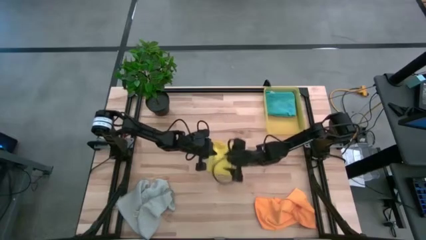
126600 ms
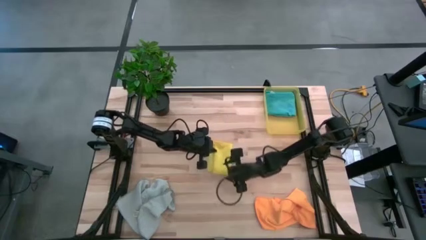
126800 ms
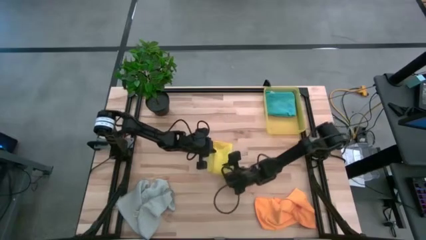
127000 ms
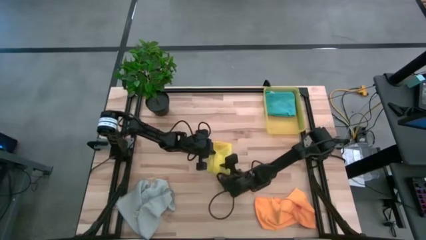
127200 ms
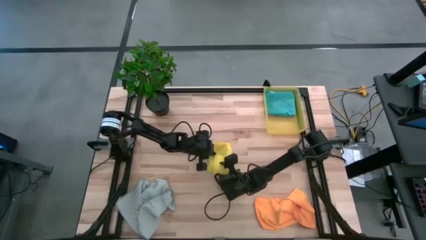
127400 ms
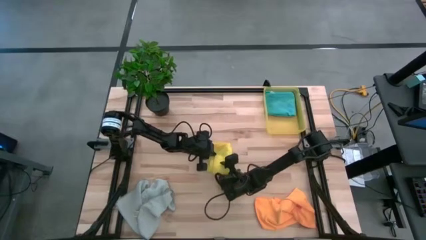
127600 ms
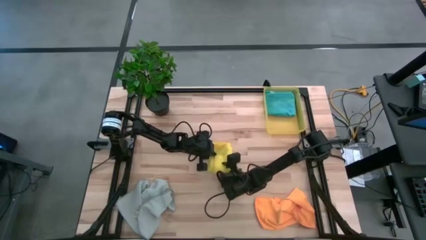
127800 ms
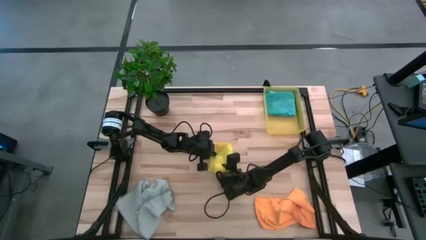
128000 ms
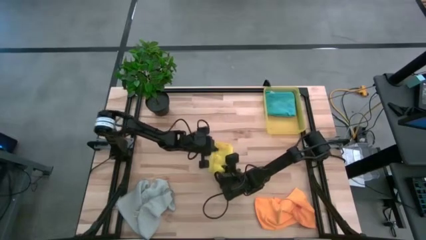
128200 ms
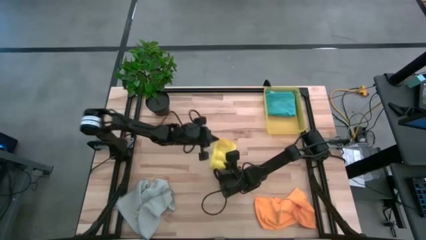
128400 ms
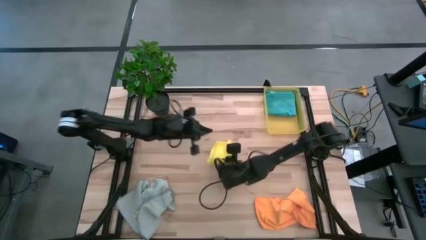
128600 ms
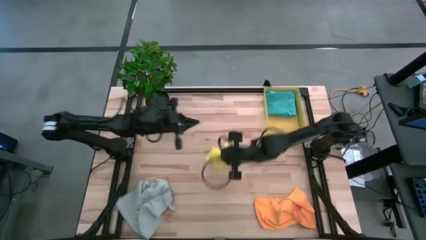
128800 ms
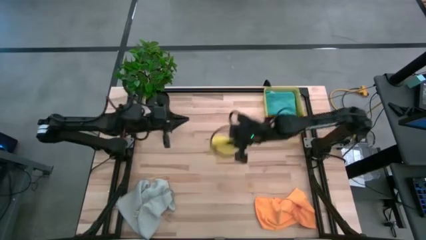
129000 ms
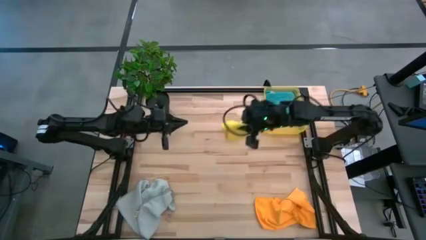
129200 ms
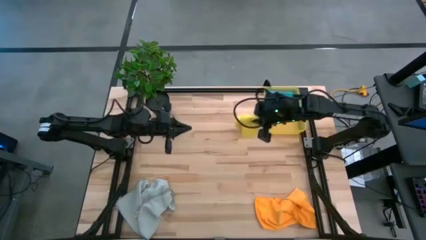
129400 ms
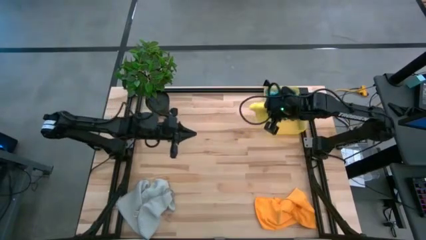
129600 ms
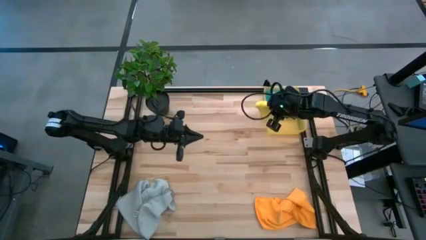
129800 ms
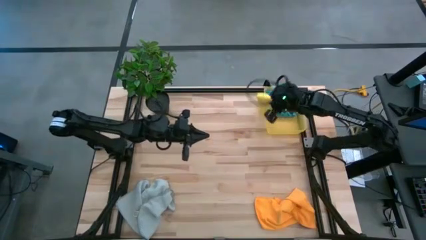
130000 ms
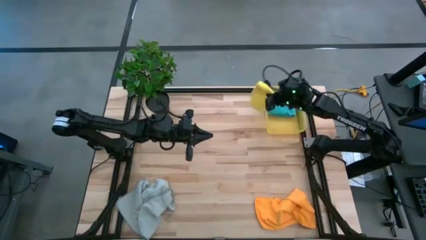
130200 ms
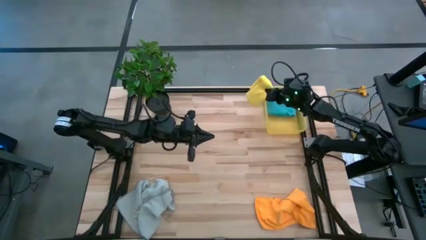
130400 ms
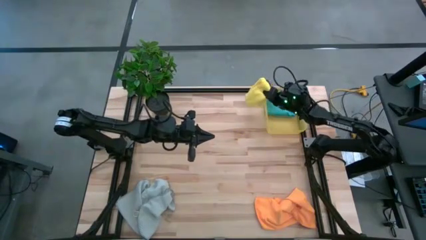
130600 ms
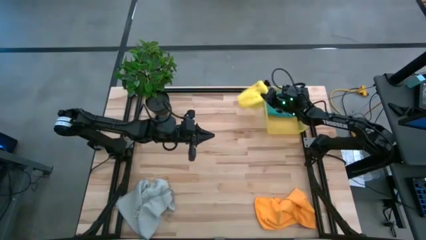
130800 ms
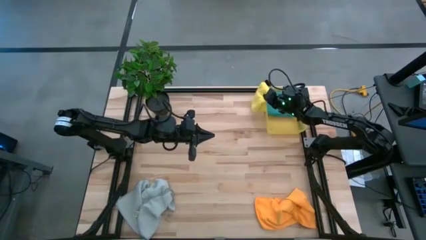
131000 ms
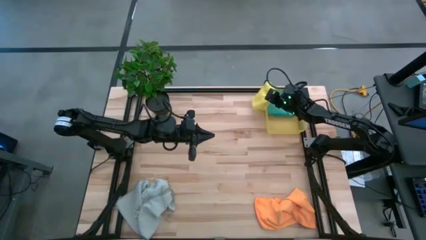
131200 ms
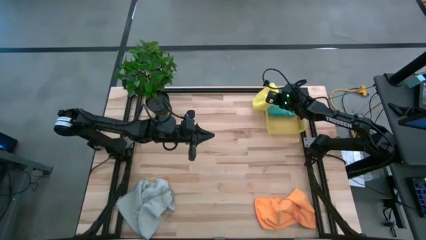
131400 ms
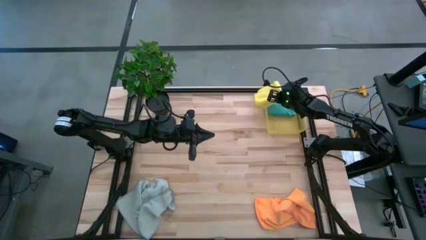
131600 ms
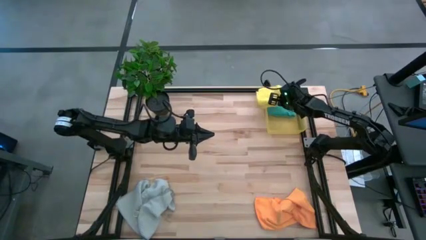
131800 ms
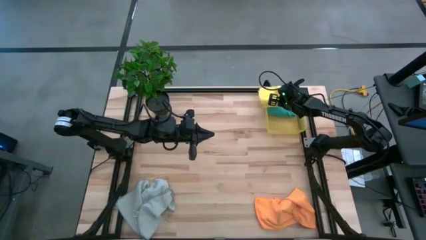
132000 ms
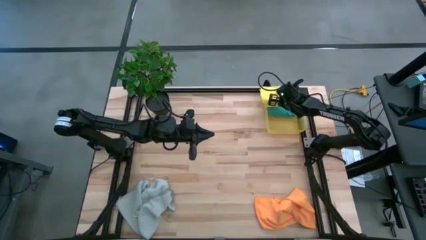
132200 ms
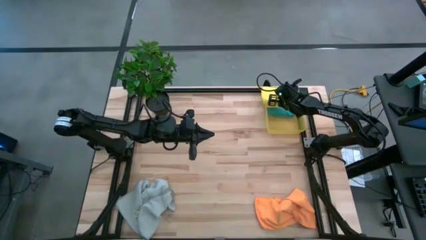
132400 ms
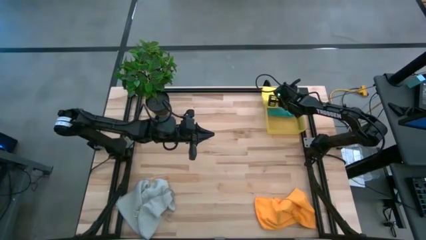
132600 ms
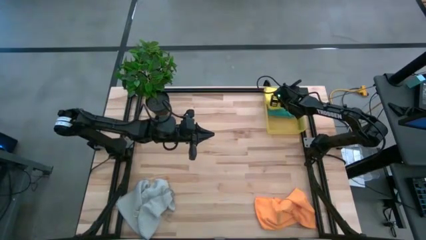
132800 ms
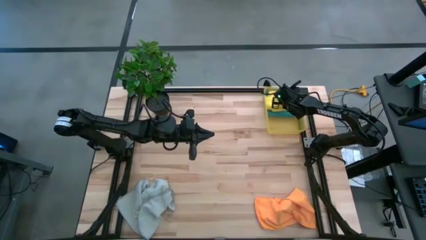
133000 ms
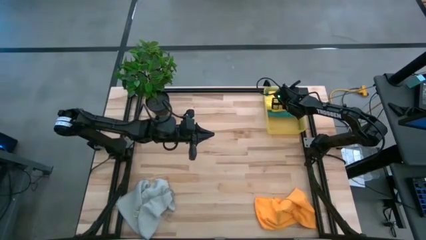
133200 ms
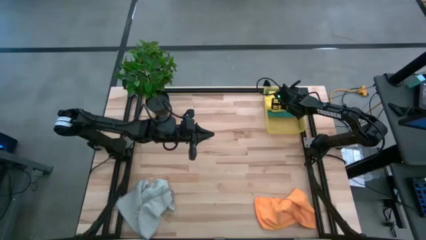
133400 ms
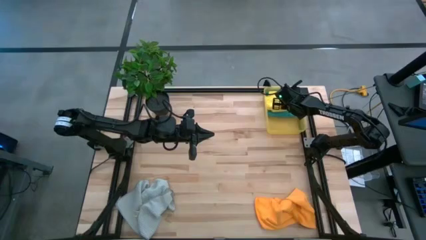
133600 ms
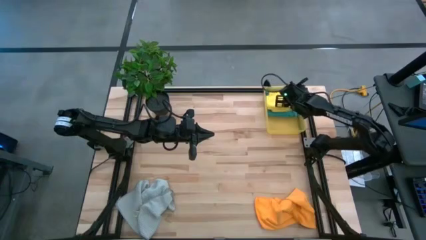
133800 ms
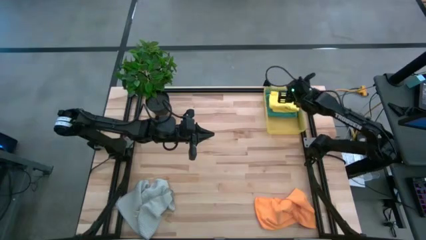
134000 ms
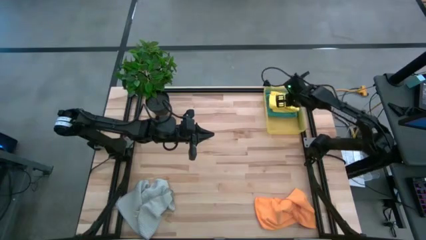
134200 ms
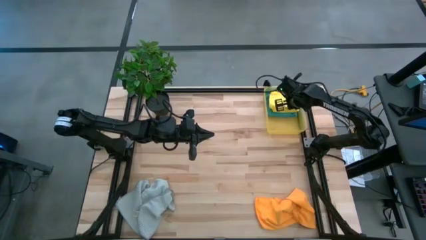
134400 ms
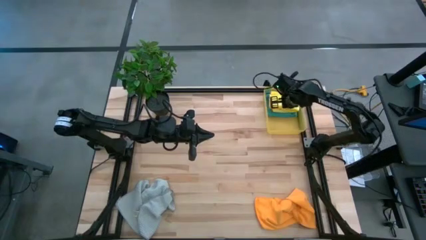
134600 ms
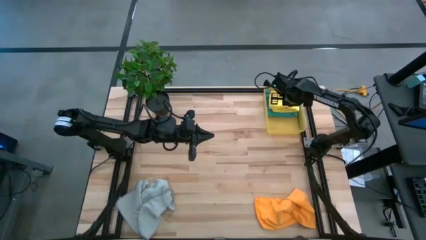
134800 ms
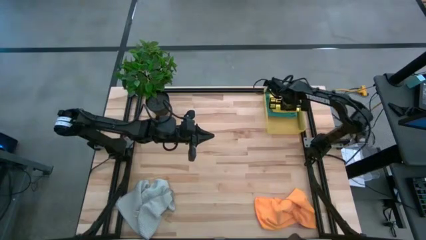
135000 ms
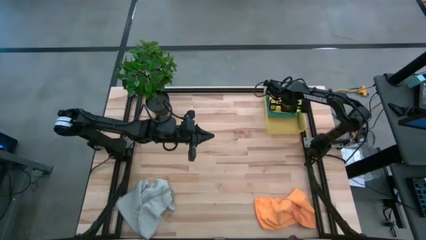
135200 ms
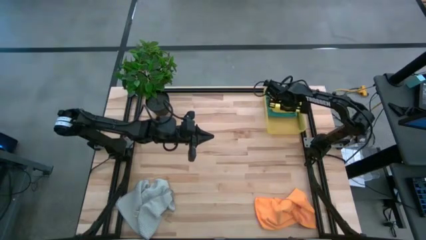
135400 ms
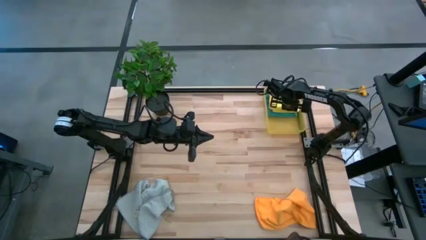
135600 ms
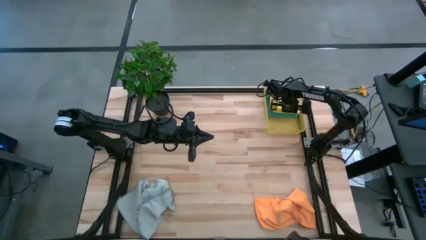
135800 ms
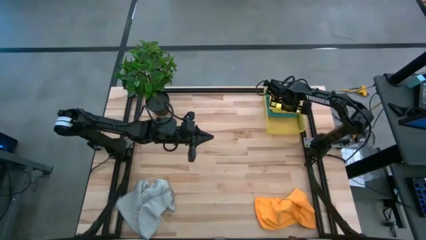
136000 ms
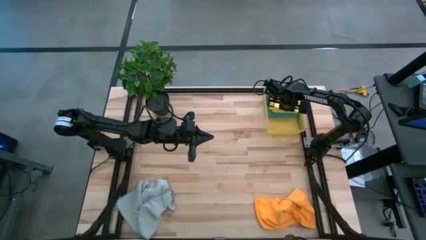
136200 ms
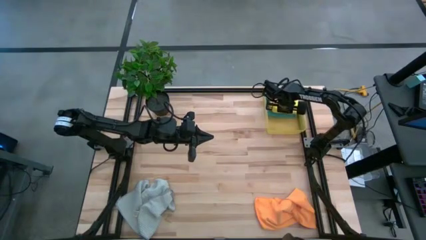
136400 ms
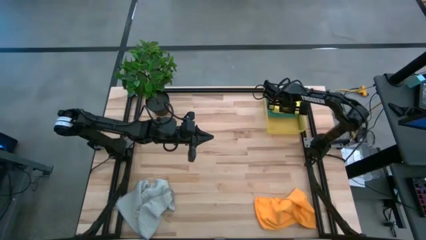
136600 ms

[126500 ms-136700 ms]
Task: Fold microfiber towels
Put the yellow microfiber towel into the yellow bin

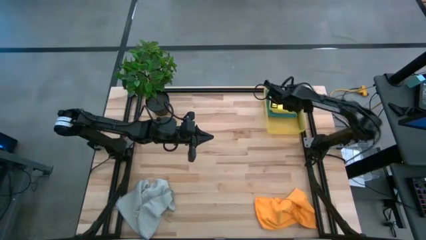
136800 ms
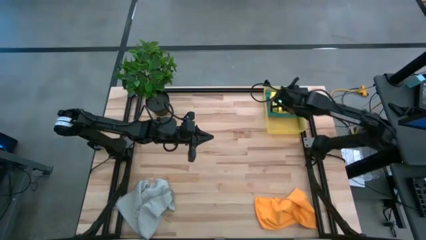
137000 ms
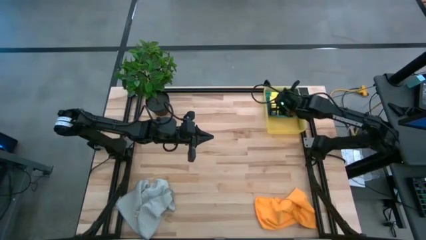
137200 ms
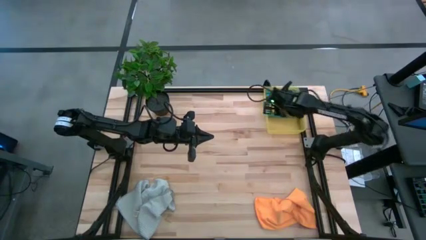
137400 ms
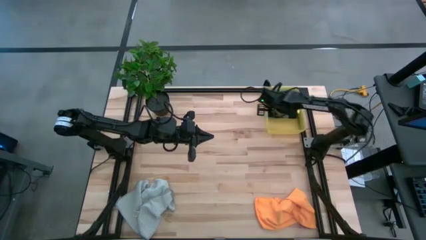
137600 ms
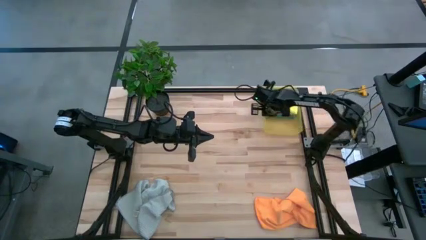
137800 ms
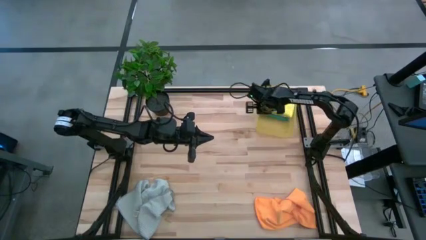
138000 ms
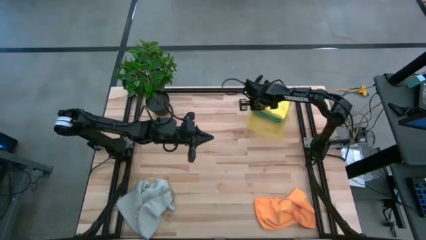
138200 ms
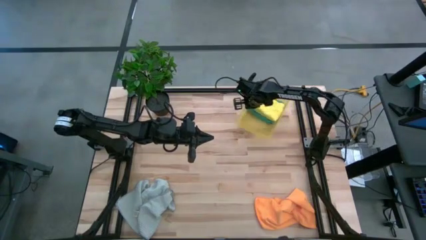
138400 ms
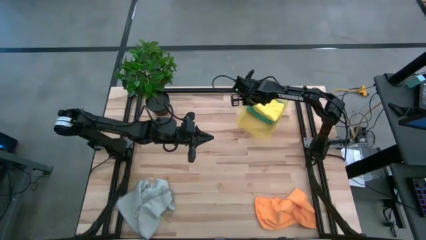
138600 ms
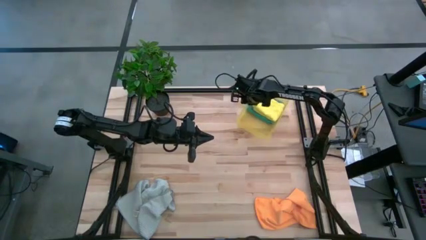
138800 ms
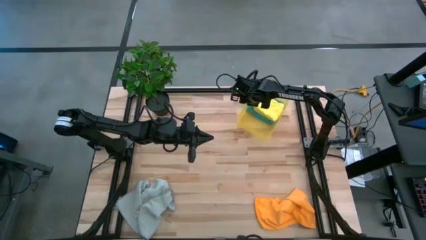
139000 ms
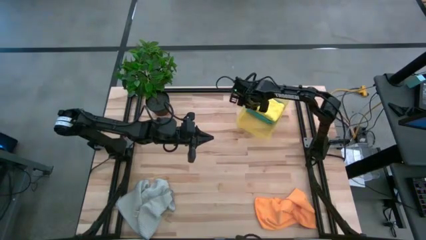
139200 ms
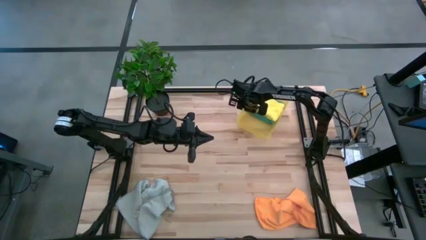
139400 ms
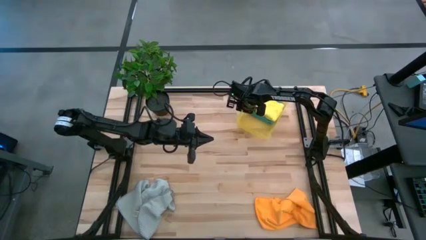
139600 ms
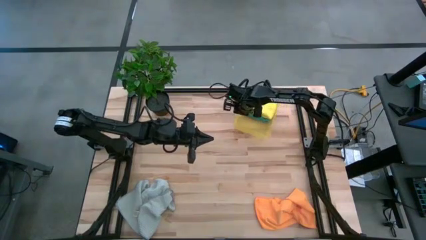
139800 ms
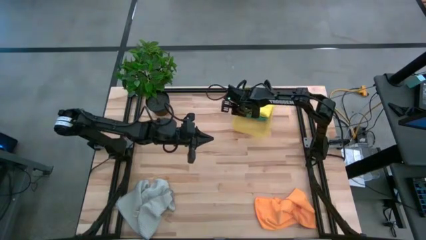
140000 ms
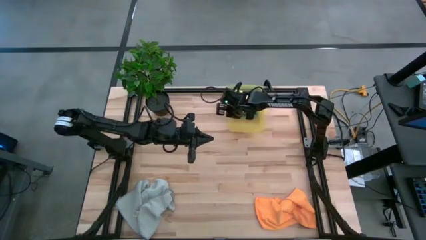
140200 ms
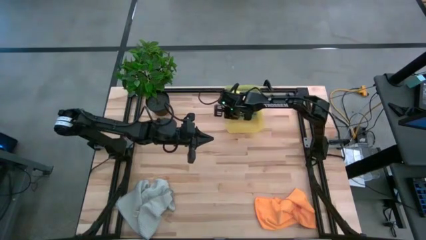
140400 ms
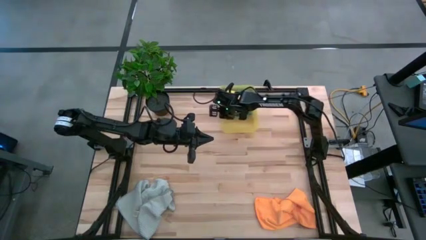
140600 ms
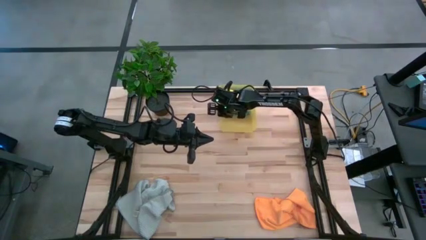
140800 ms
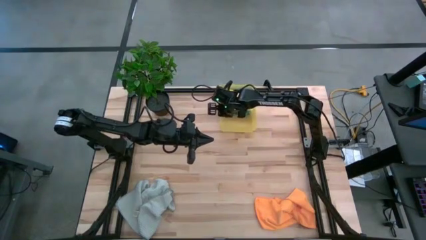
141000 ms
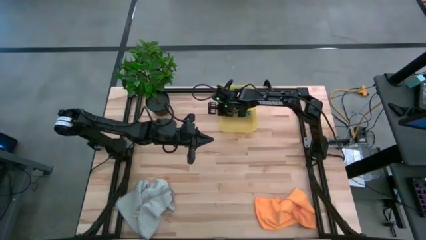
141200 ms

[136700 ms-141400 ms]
Move the yellow bin to the top of the table

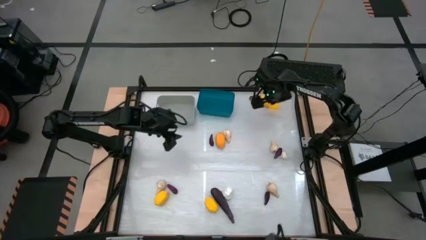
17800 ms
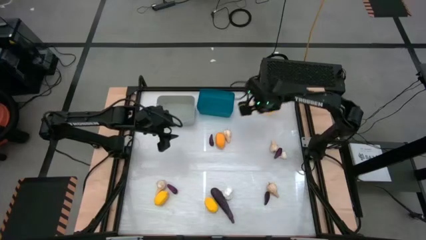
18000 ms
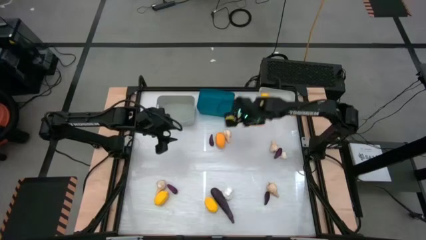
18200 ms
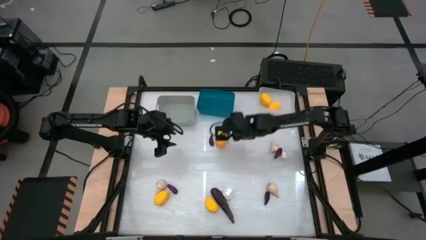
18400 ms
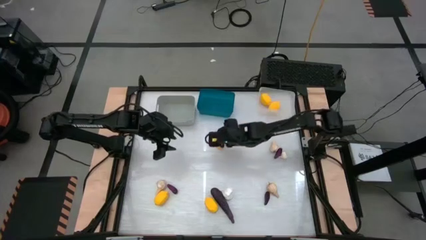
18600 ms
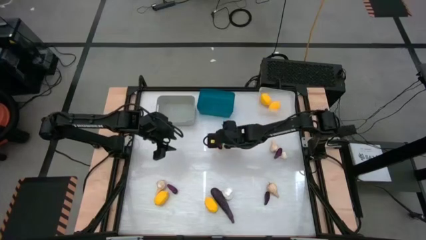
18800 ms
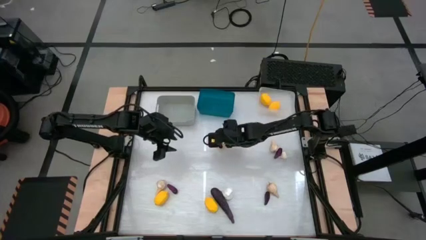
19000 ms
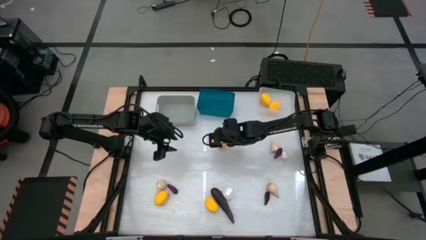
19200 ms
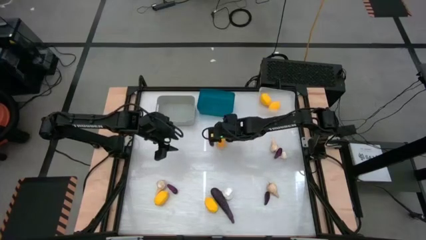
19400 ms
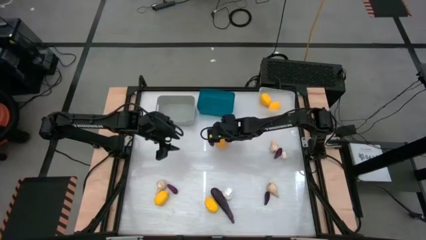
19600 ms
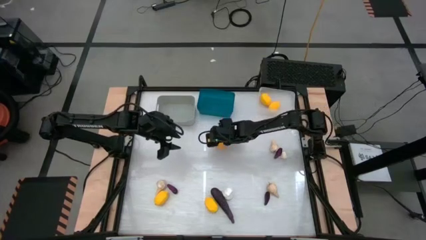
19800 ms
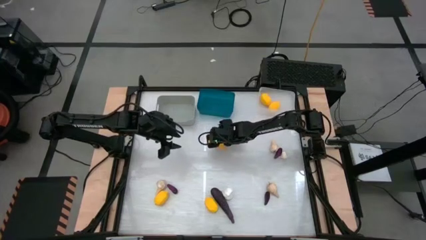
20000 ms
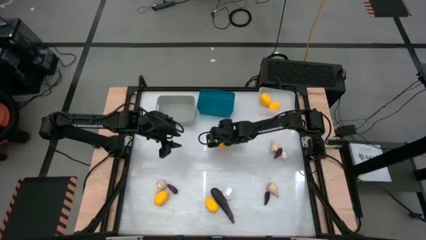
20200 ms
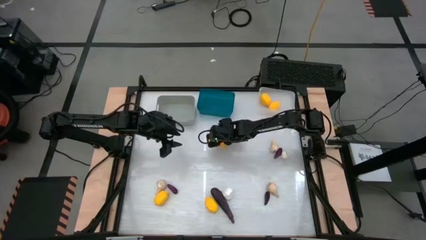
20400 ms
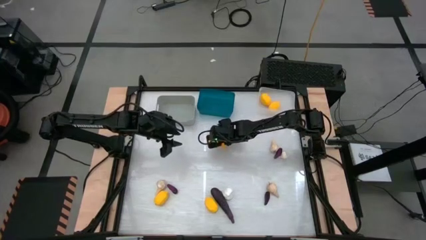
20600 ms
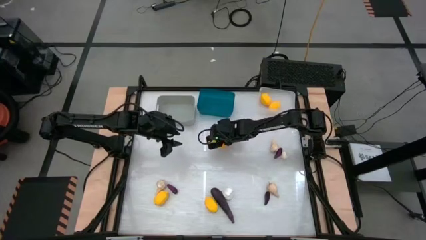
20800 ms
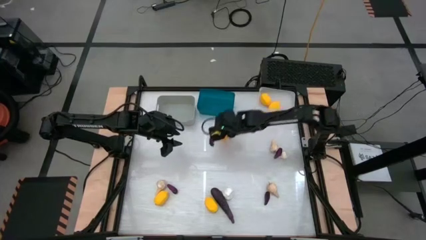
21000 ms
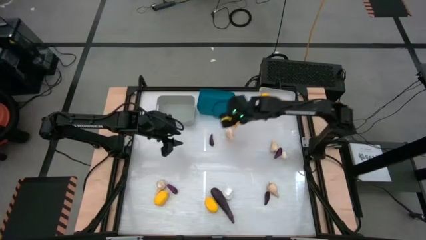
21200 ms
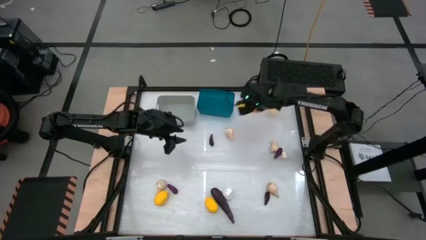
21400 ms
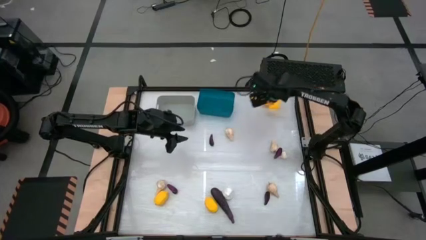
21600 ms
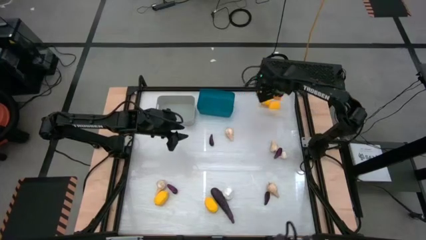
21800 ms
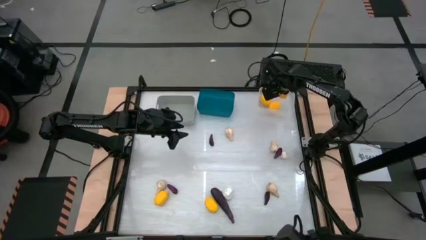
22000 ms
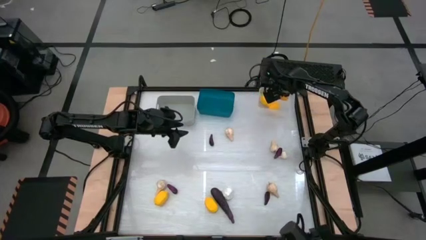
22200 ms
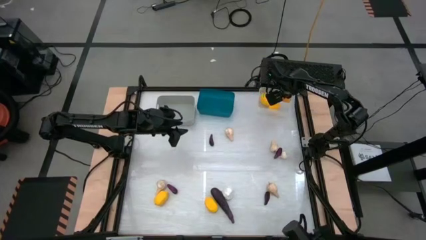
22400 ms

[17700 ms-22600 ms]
Task: Sort produce into baskets
Put the lemon into the transparent bin
